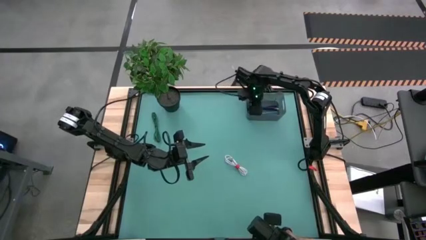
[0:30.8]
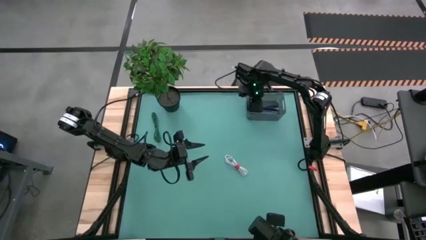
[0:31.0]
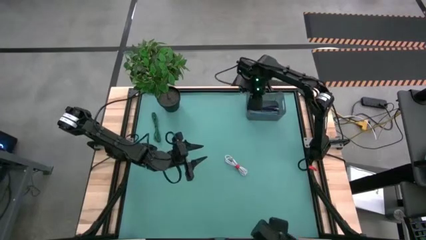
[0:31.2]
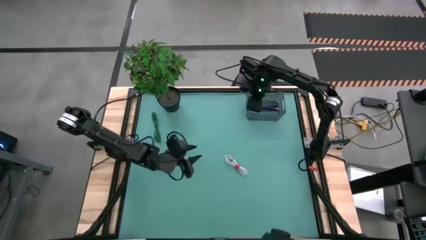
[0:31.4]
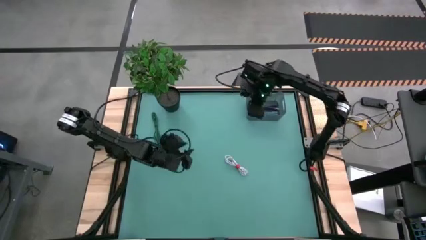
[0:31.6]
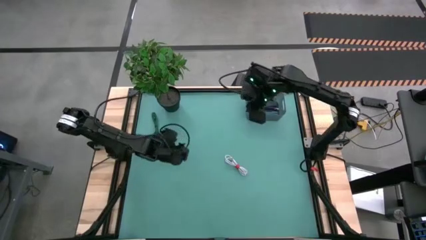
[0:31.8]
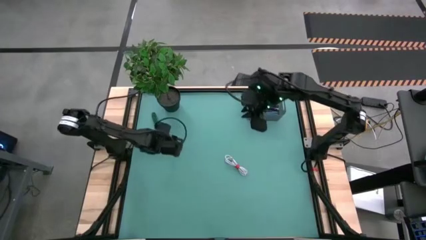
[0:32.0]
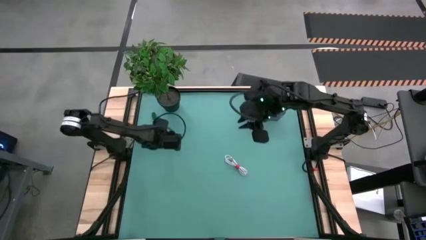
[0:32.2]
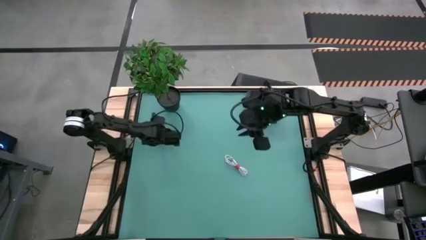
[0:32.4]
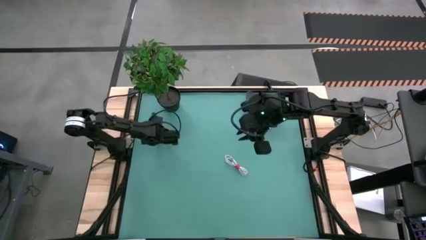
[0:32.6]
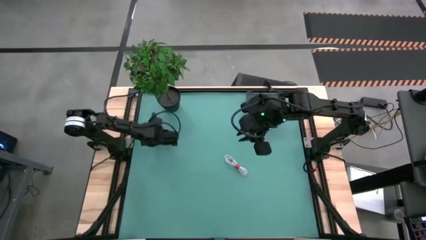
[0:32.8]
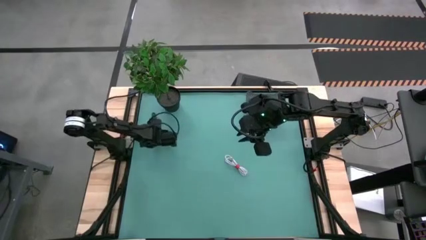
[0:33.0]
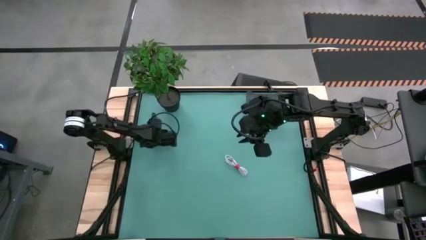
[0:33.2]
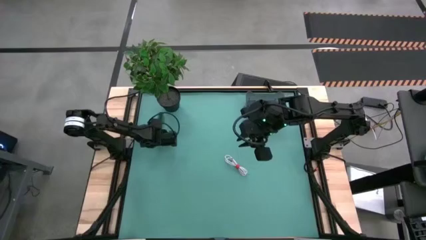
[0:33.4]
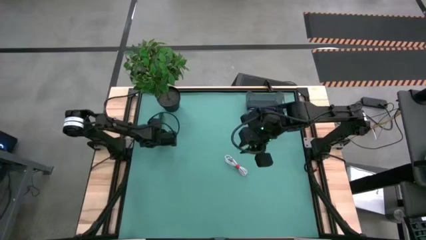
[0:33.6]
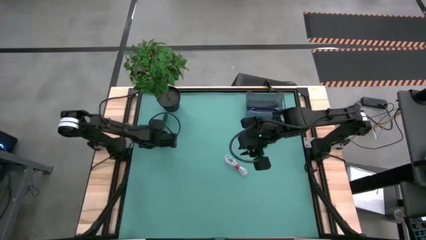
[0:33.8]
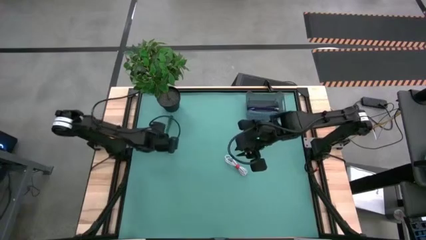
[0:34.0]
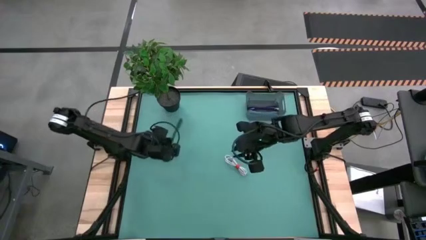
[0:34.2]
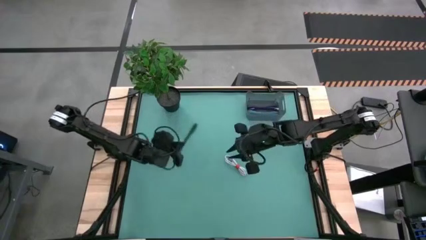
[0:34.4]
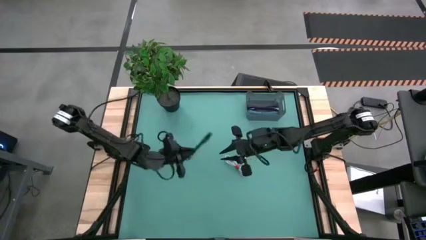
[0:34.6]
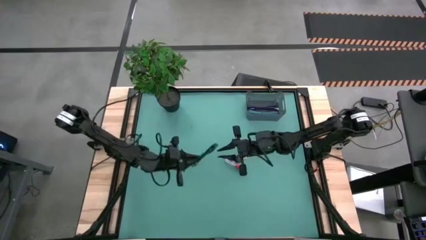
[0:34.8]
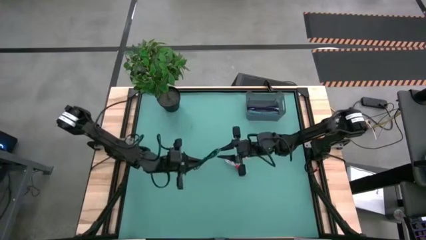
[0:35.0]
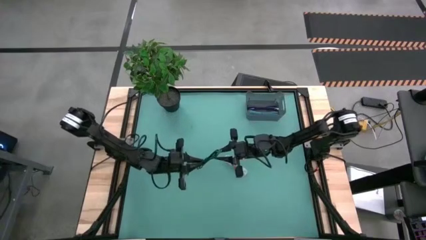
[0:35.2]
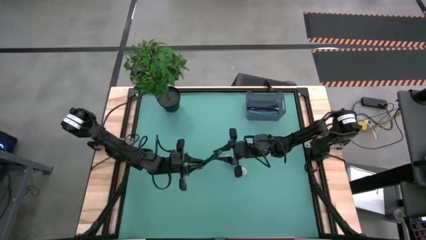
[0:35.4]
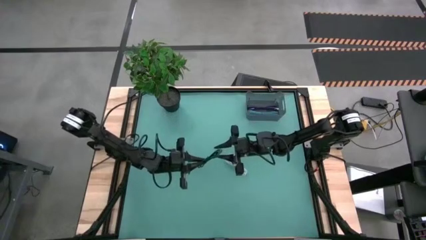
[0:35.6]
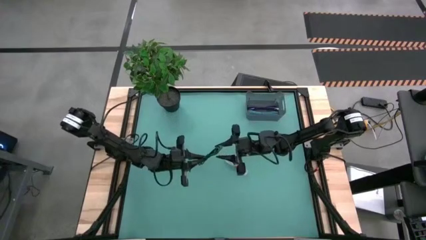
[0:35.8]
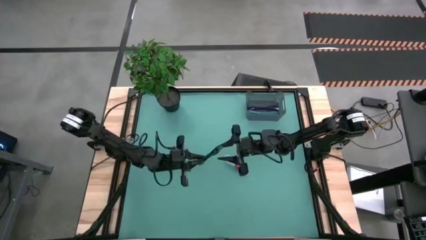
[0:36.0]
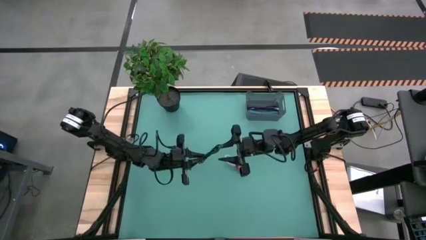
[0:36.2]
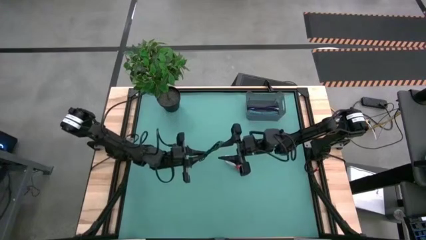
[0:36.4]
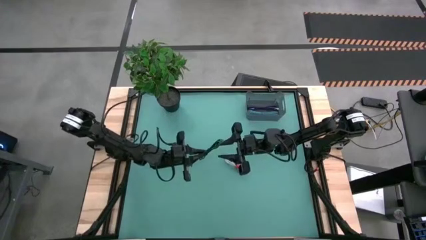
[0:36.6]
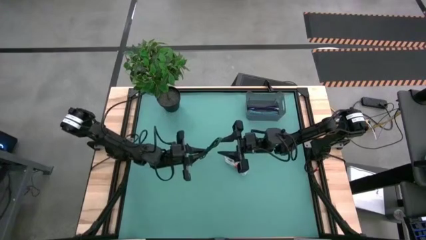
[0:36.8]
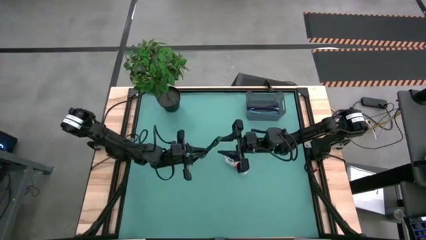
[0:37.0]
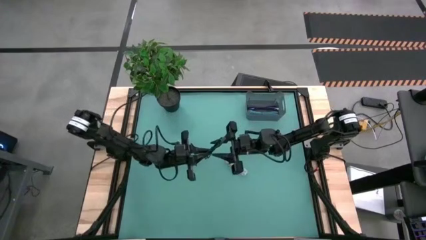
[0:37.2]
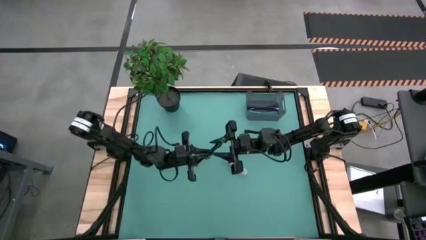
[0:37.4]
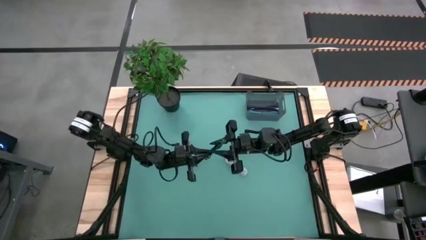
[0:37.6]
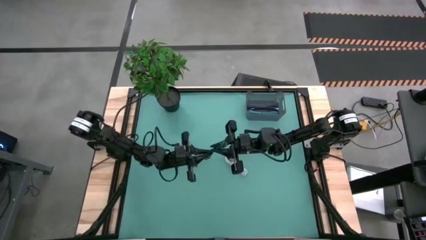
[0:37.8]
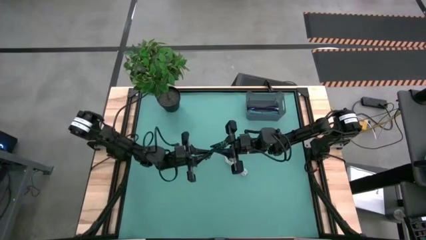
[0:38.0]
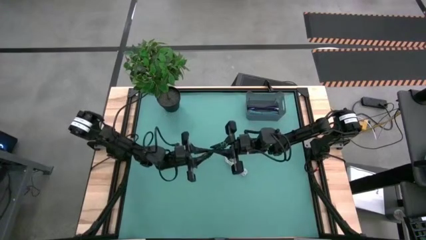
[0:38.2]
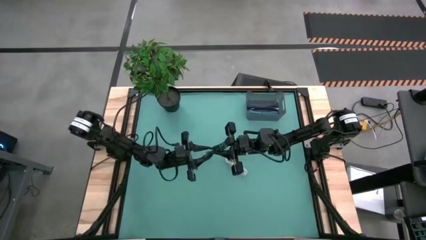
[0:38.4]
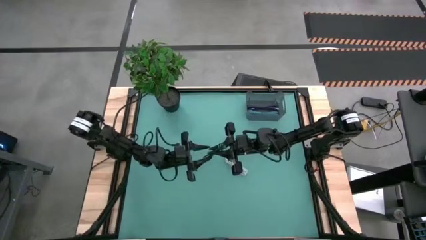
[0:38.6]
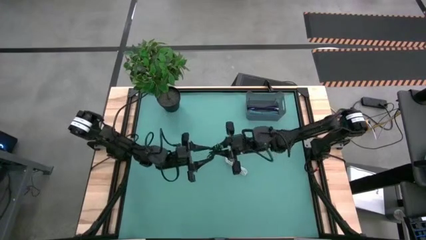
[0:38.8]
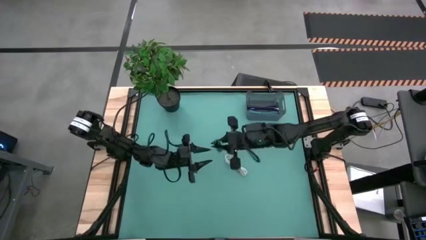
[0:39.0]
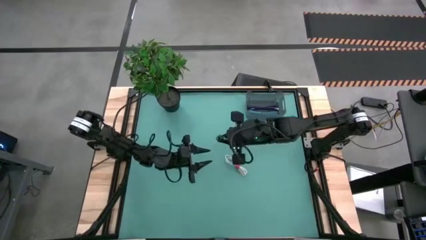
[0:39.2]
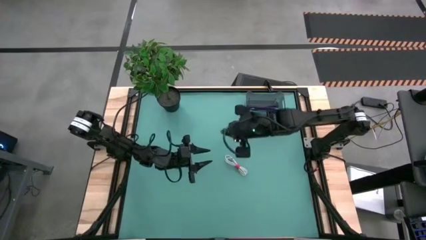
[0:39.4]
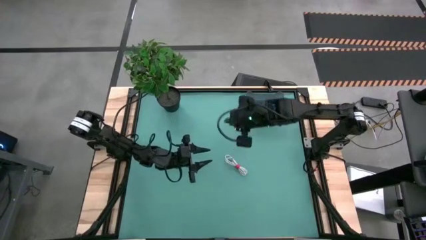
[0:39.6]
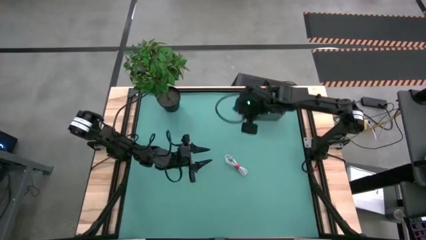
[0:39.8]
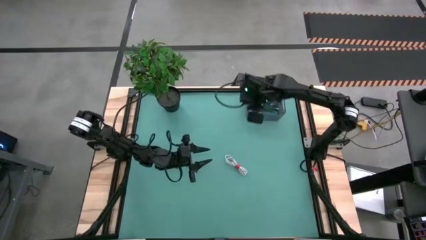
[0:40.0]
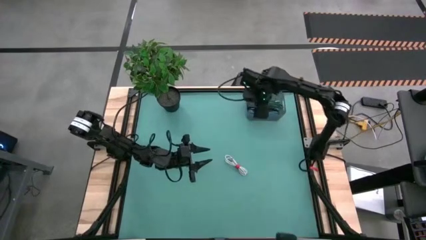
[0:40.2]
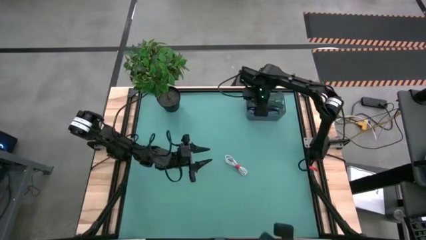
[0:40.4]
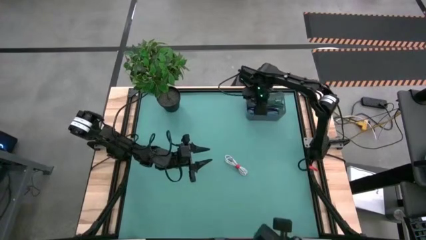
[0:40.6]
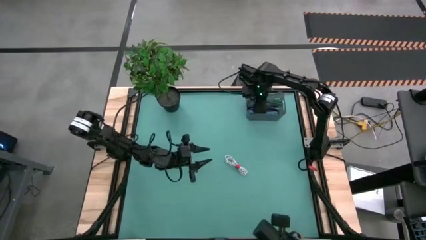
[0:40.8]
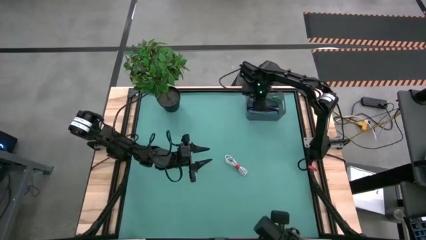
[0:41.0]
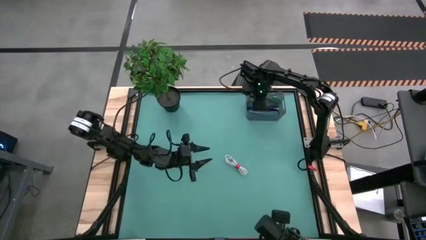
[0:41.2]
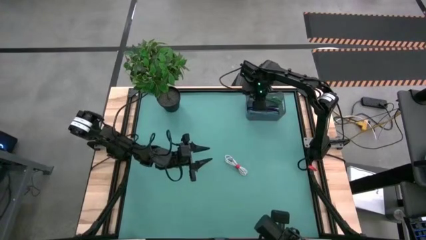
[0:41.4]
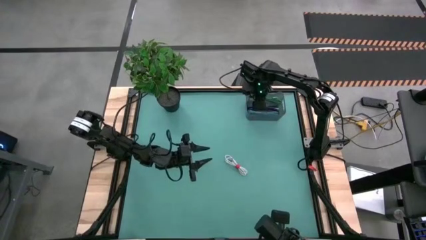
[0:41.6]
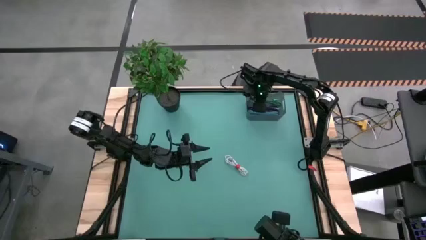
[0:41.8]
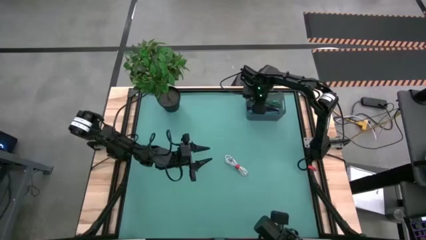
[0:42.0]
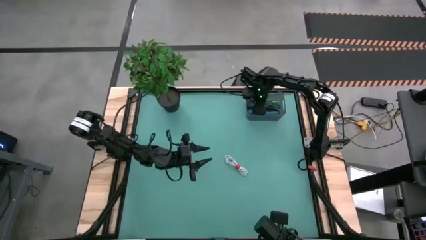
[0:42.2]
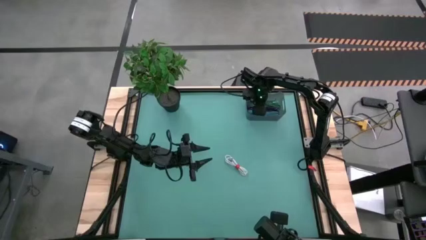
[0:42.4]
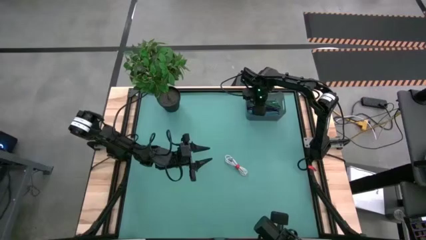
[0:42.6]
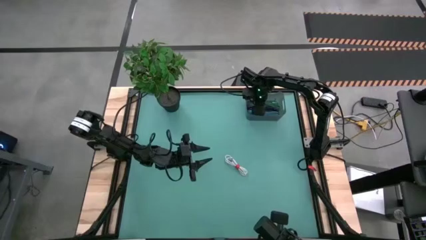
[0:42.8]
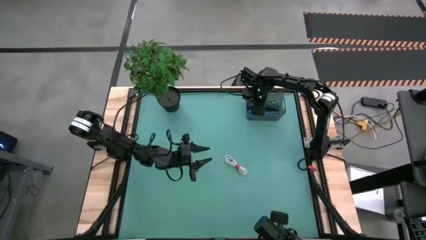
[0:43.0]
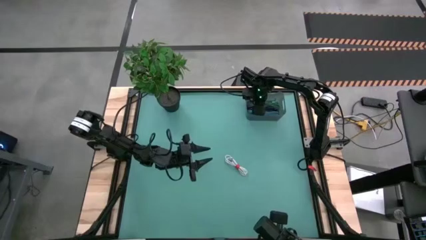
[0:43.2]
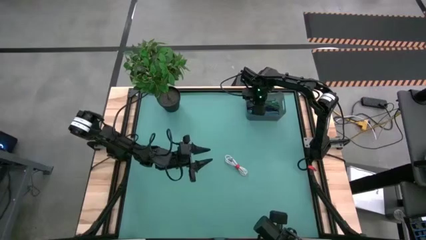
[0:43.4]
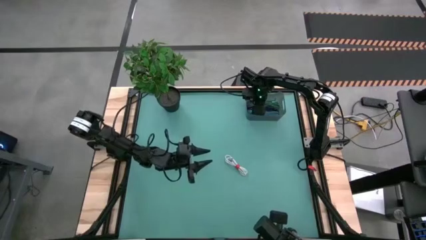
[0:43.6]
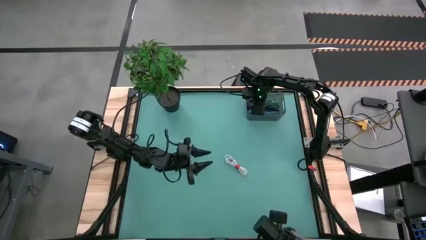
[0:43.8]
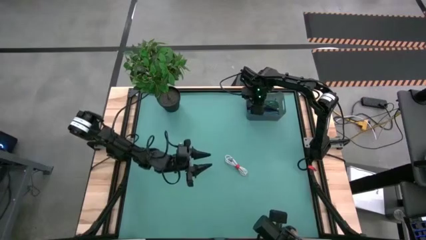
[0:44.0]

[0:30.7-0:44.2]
Task: Pick and place USB-C Cables
Put the green charger cable into the bin
